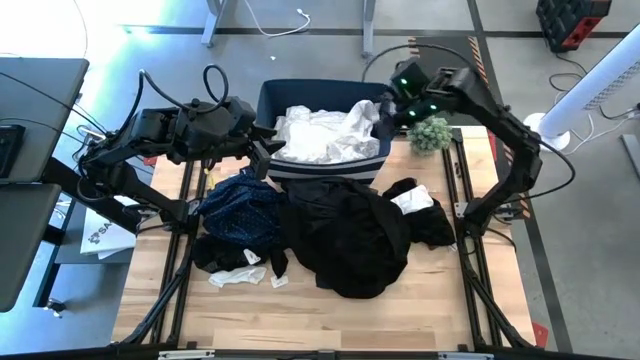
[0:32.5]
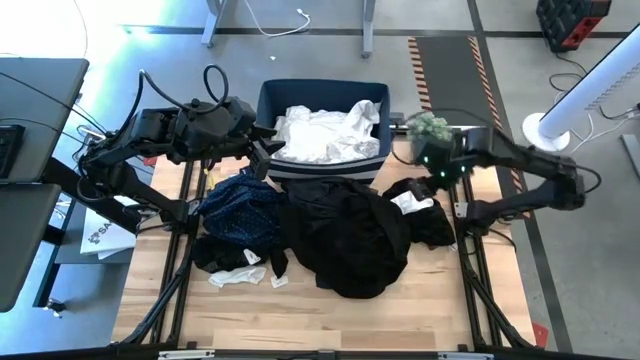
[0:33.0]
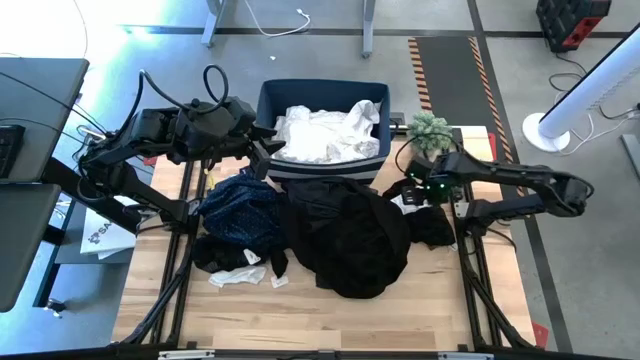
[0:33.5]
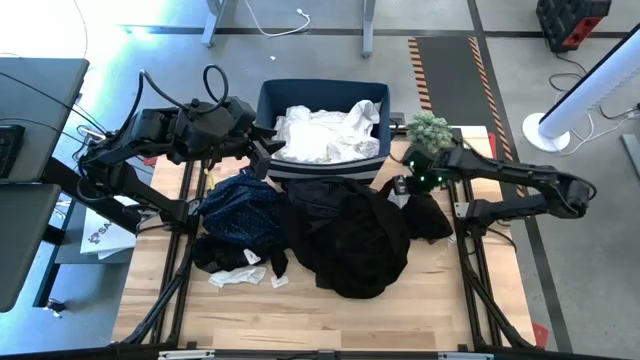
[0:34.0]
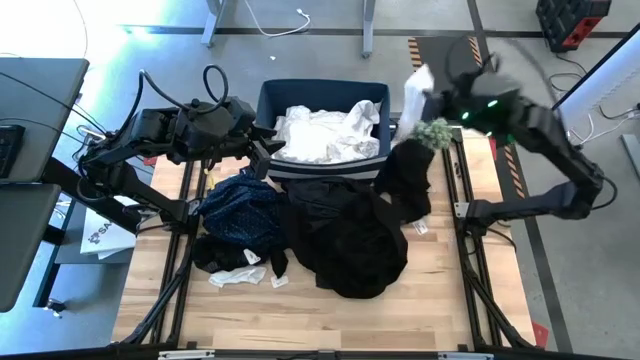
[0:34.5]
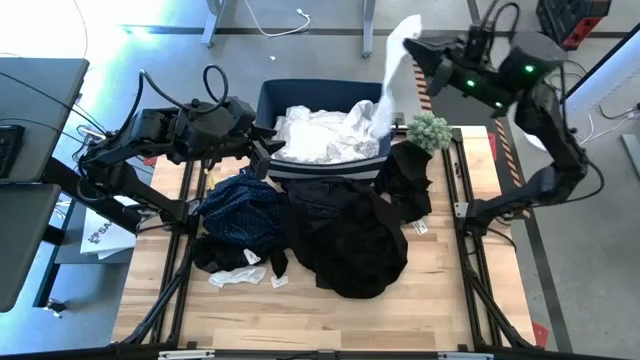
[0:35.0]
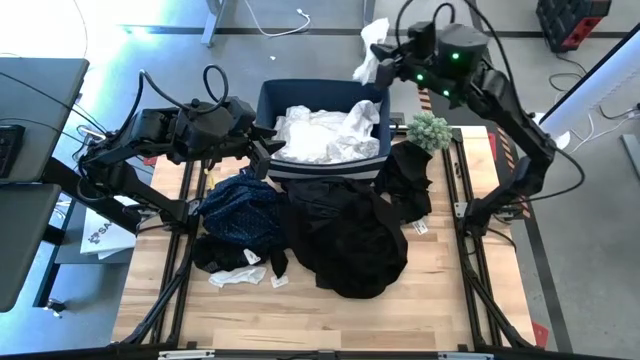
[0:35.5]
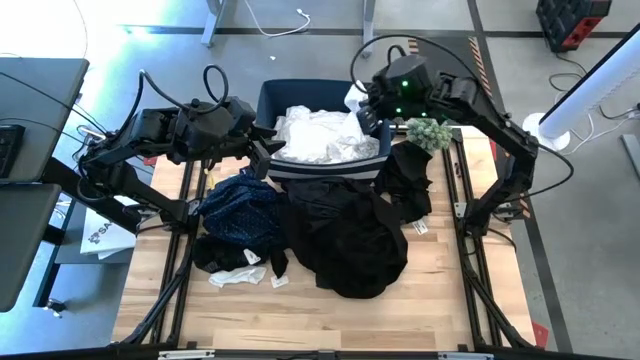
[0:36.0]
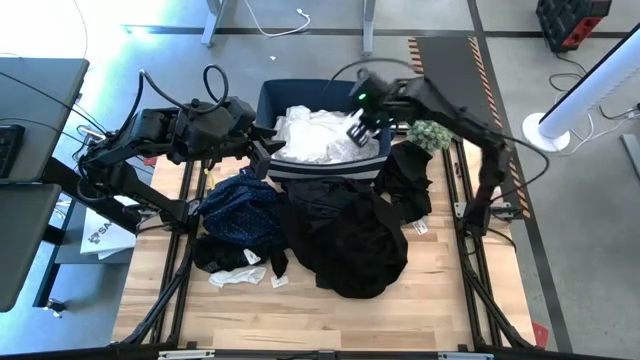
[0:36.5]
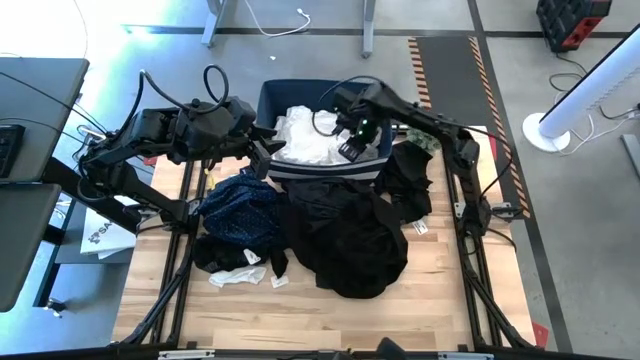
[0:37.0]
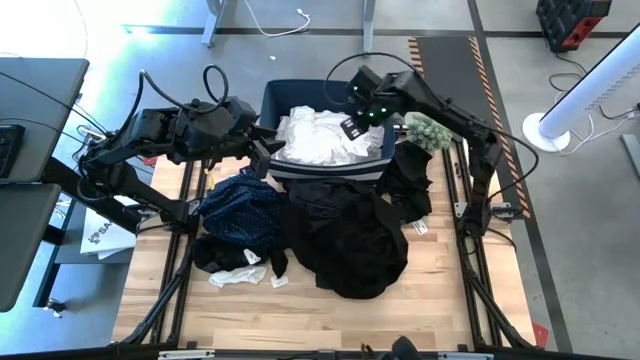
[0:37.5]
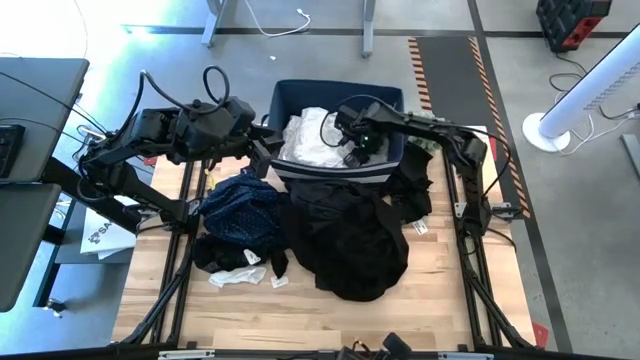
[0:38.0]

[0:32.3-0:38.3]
Task: Sort clothes
Put the right white sock into the blue bin

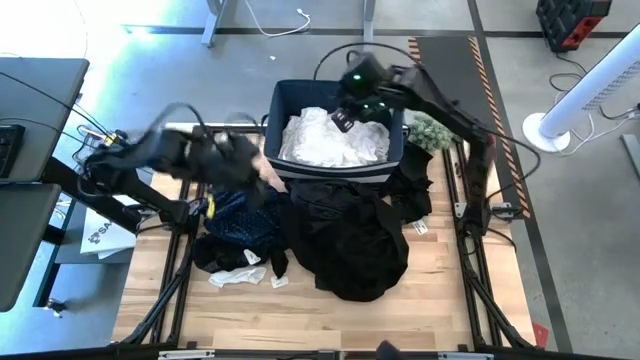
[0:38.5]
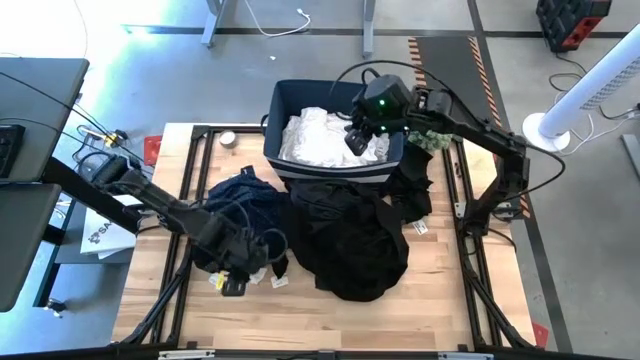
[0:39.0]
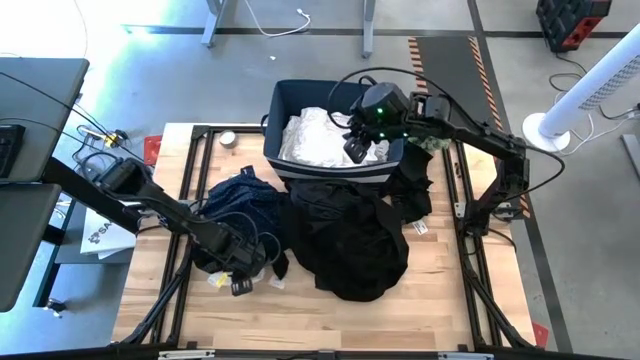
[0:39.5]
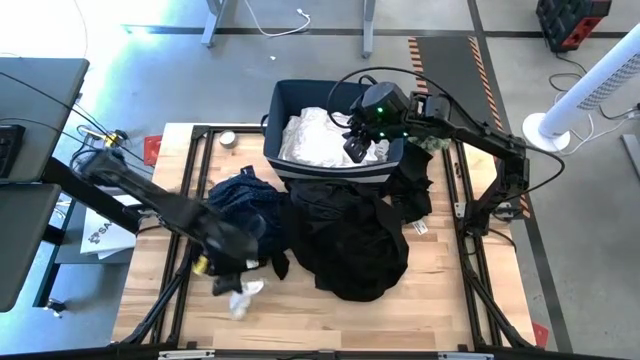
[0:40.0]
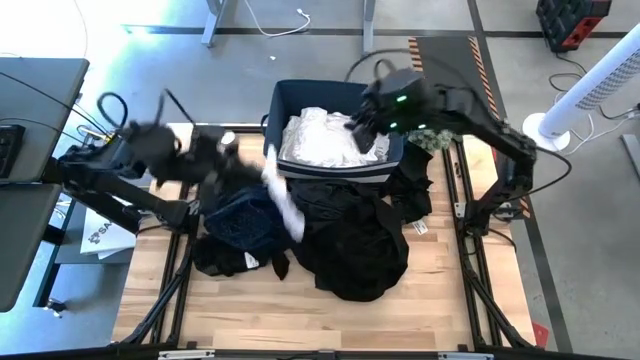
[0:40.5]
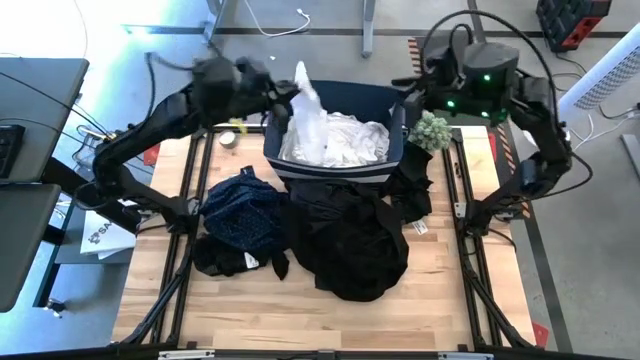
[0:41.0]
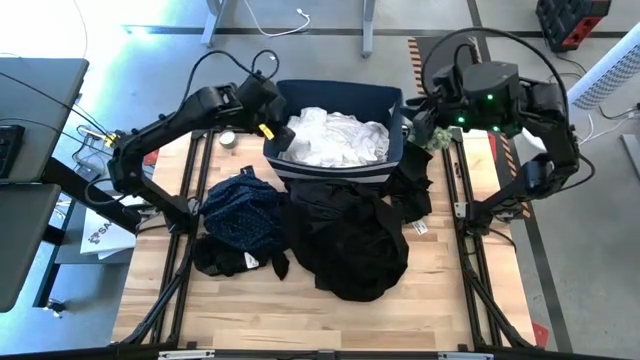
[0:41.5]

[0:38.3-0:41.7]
Put the white sock into the blue bin

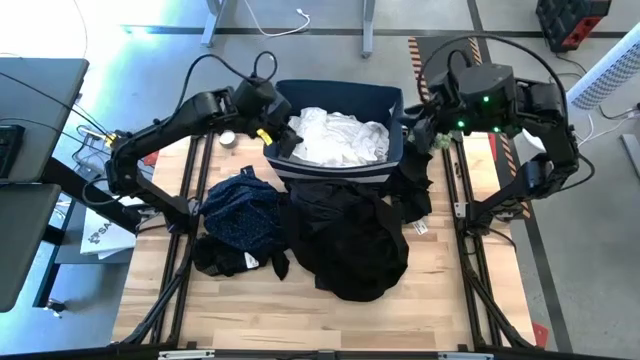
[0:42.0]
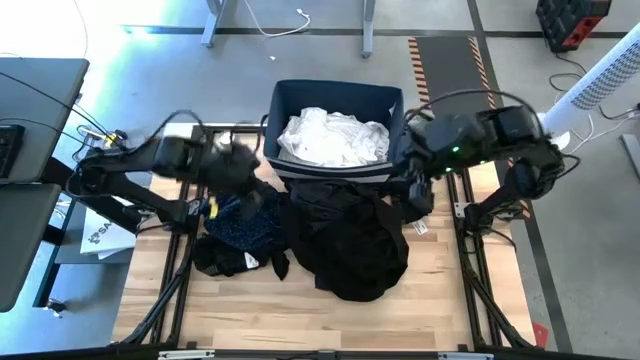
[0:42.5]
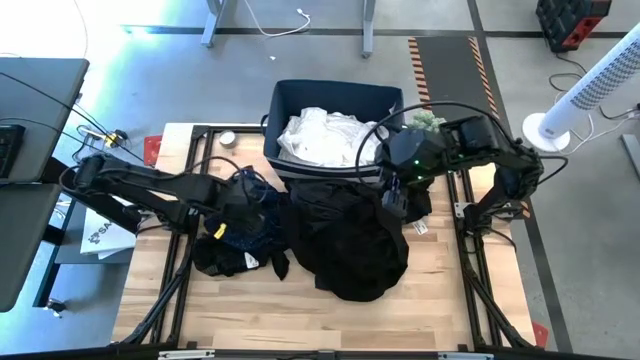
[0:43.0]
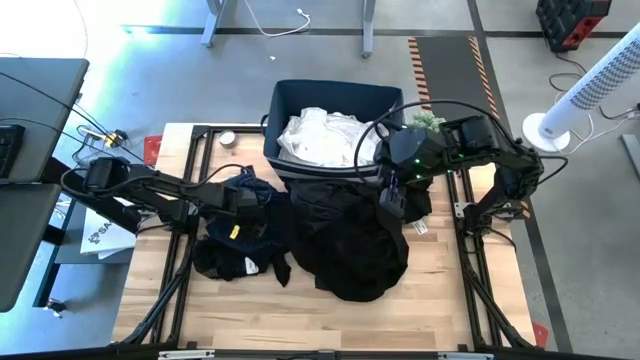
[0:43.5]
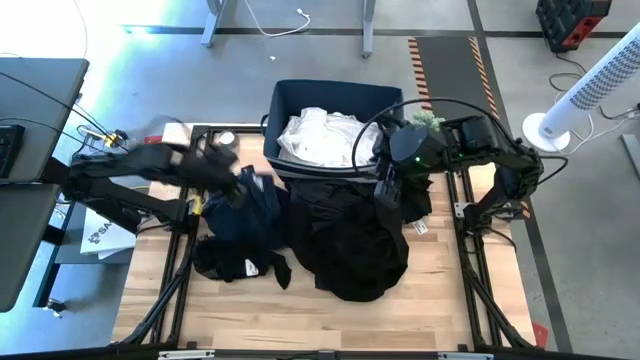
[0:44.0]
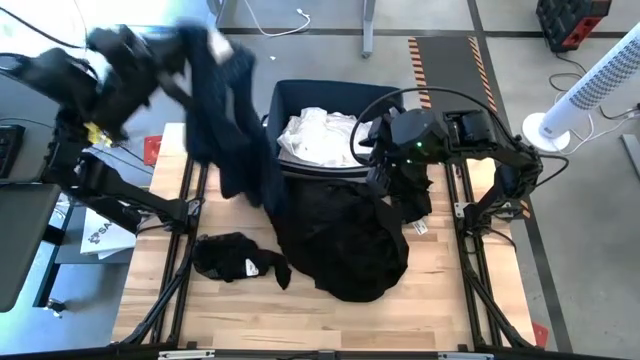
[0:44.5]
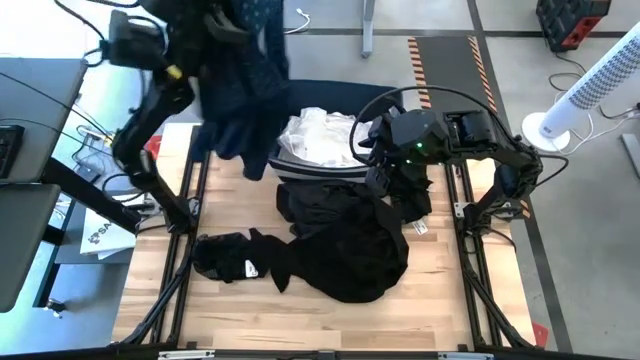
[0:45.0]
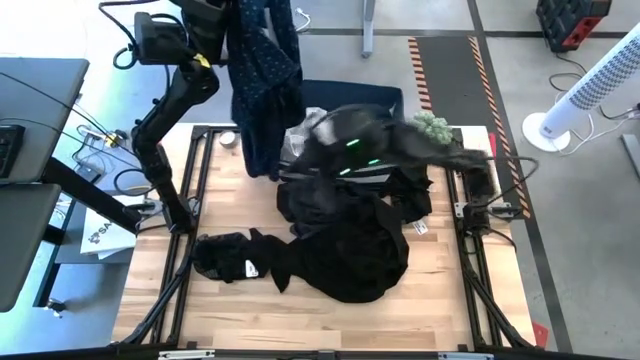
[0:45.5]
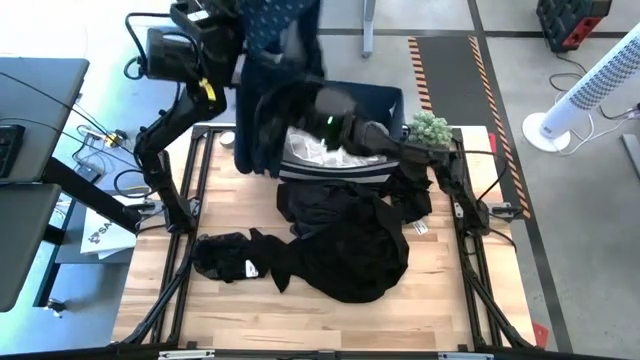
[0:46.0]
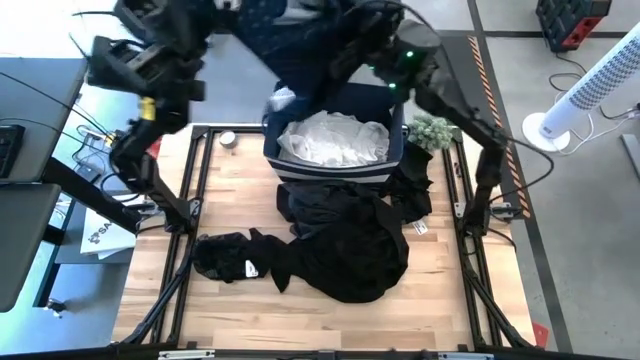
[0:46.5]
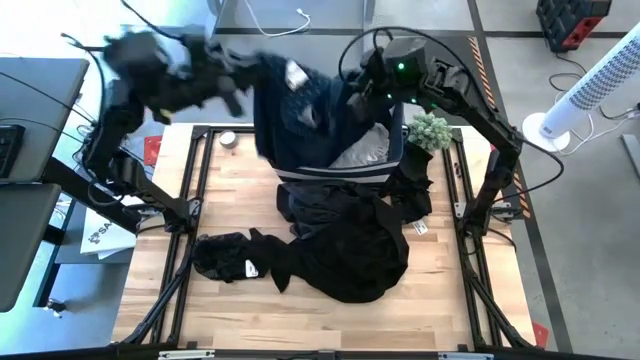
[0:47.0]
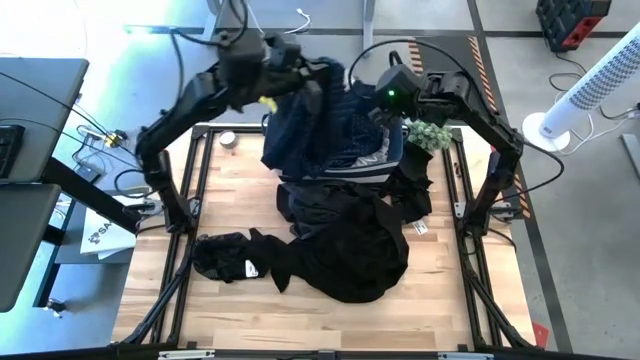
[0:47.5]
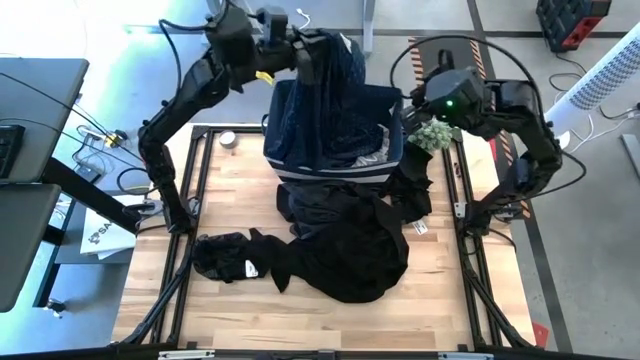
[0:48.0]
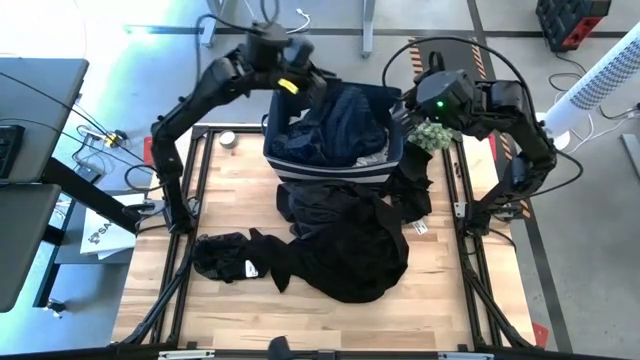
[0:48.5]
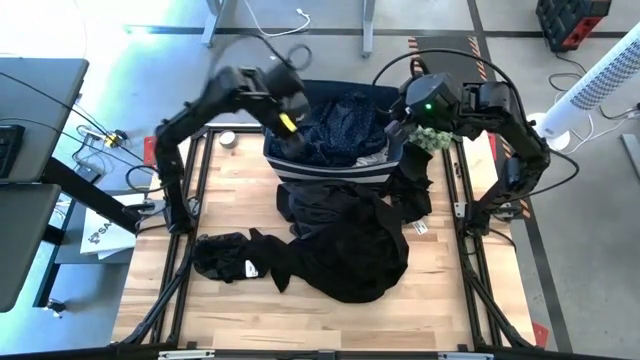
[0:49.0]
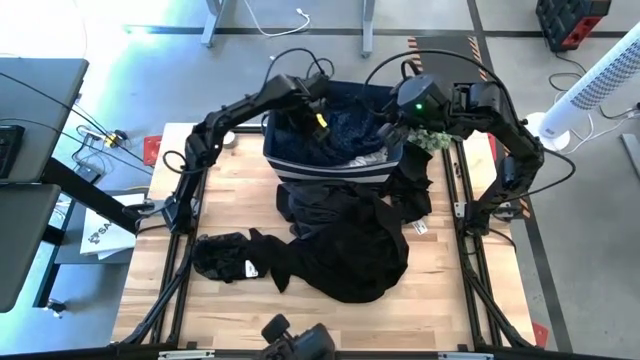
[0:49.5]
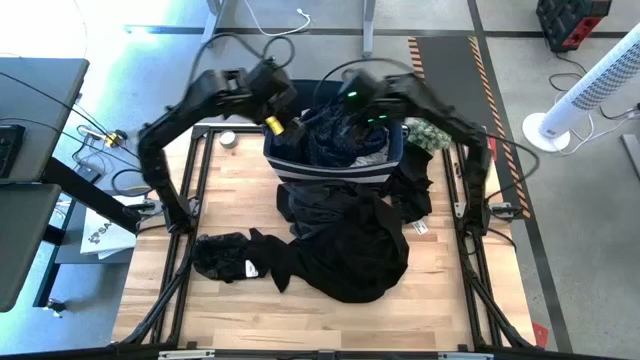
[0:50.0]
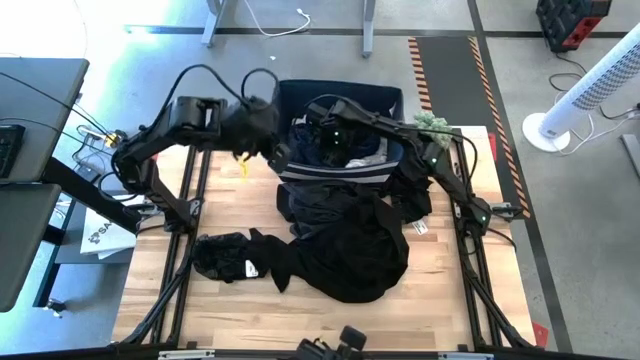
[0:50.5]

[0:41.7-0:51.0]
Put the blue shirt into the blue bin

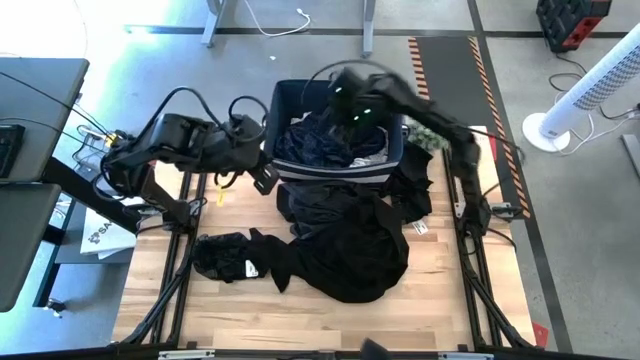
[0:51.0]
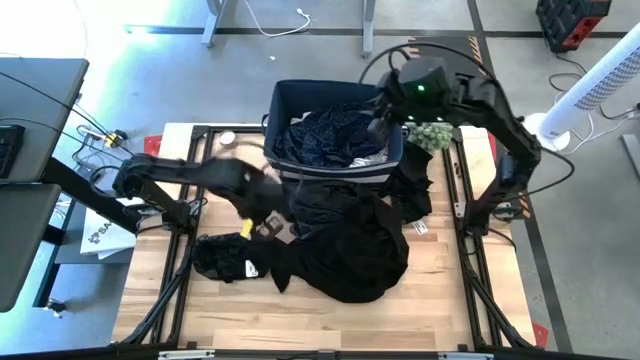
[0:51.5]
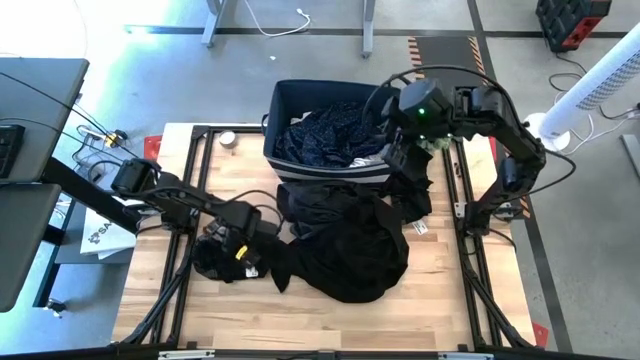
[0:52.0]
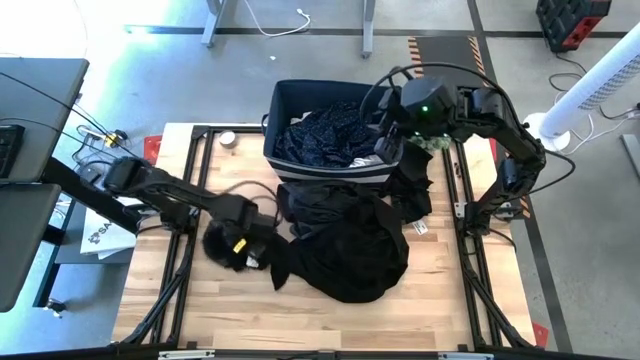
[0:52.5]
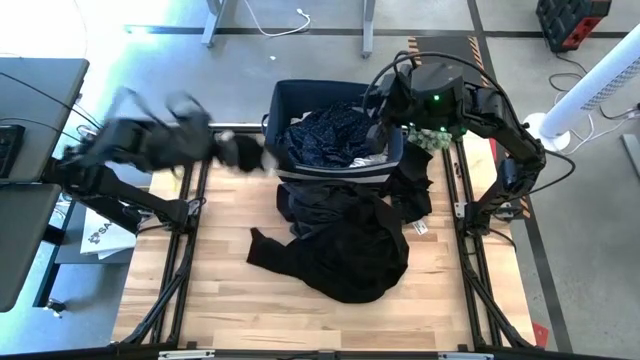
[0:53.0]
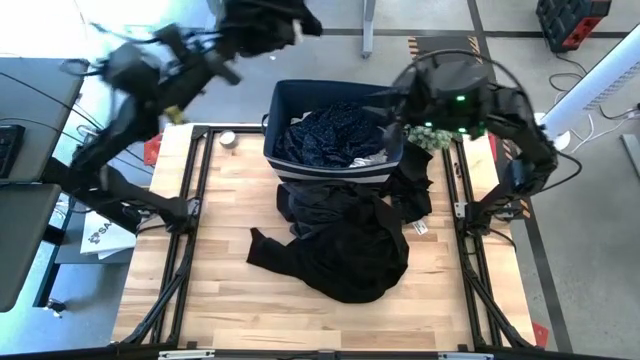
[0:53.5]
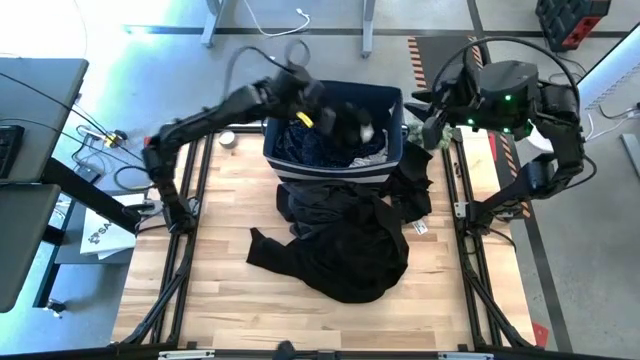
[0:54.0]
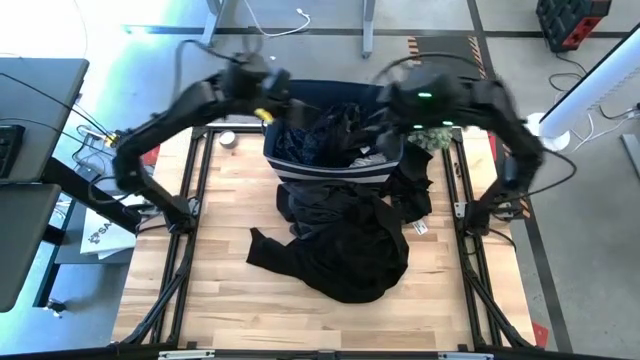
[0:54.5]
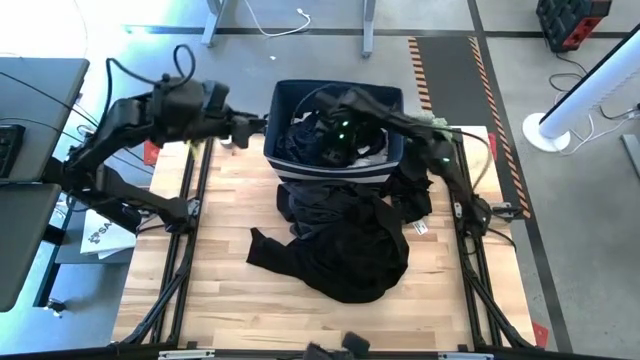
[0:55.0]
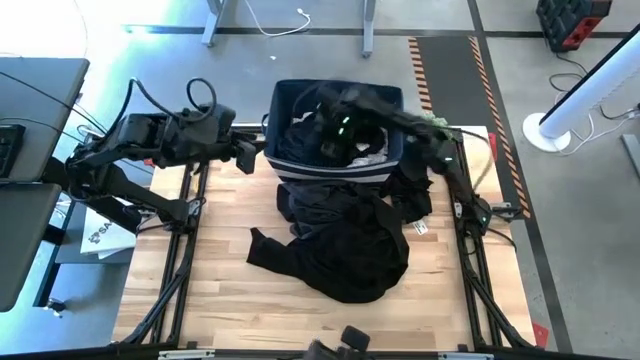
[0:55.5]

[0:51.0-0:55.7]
Put the black shirt into the blue bin
